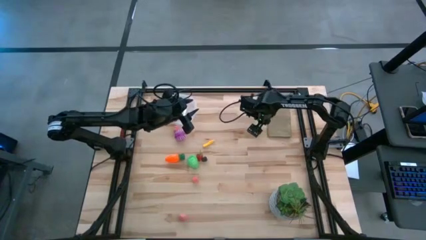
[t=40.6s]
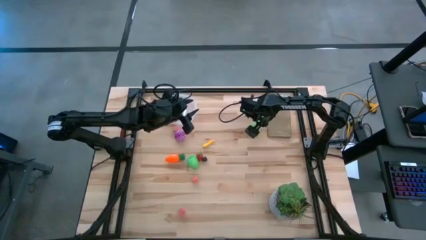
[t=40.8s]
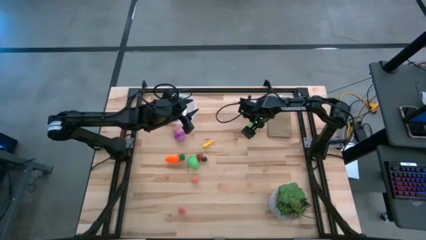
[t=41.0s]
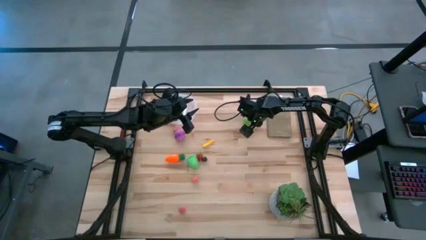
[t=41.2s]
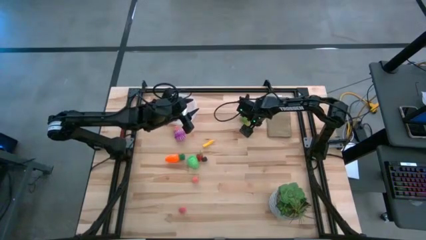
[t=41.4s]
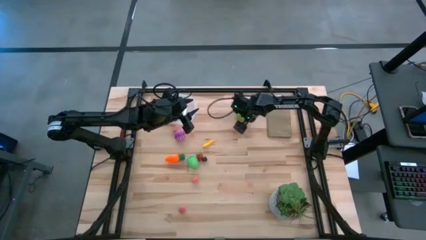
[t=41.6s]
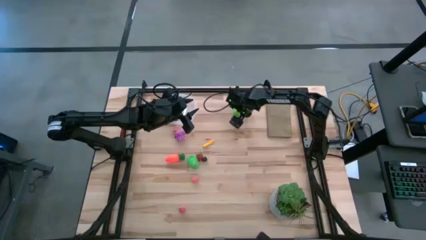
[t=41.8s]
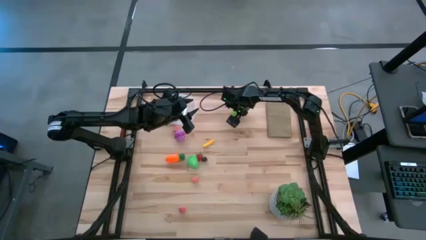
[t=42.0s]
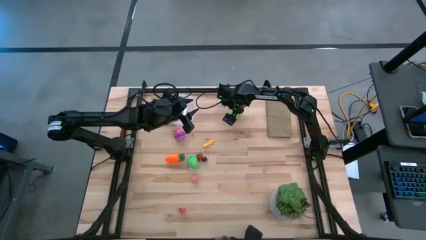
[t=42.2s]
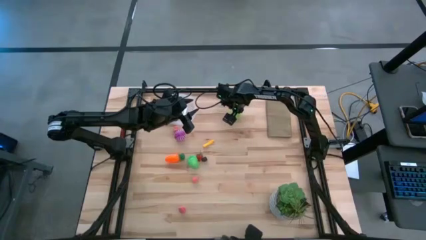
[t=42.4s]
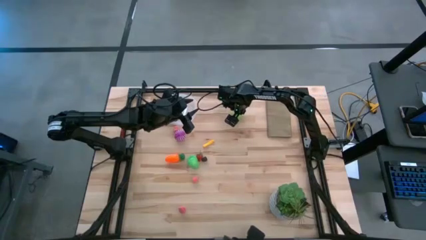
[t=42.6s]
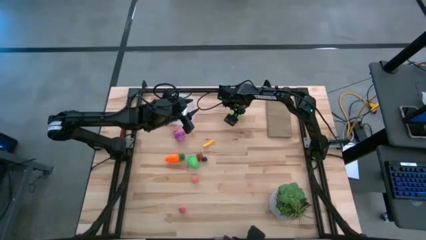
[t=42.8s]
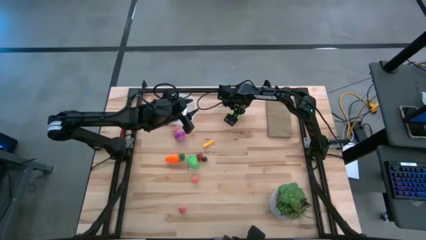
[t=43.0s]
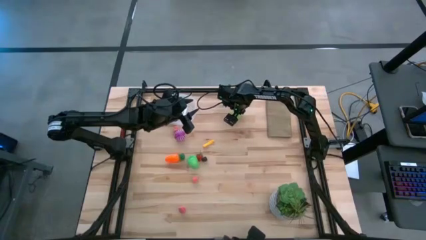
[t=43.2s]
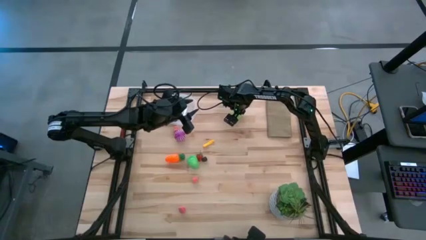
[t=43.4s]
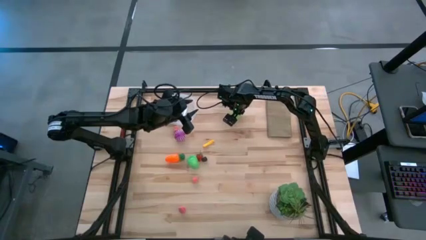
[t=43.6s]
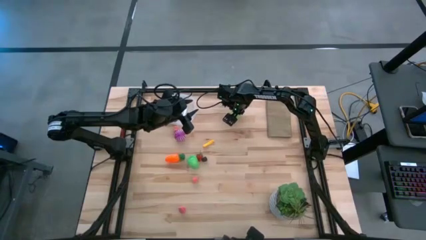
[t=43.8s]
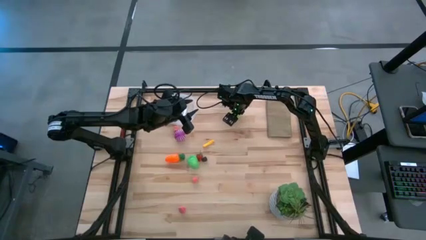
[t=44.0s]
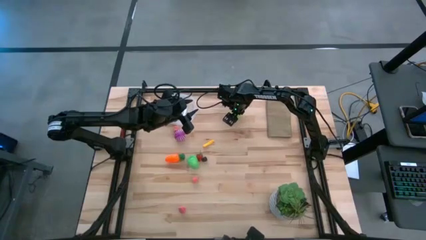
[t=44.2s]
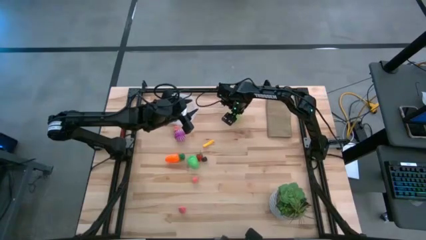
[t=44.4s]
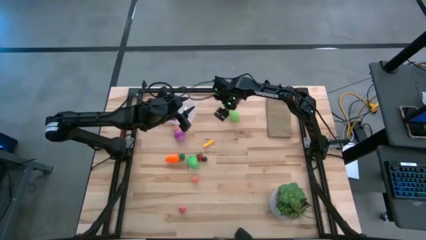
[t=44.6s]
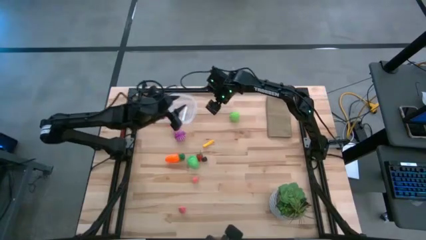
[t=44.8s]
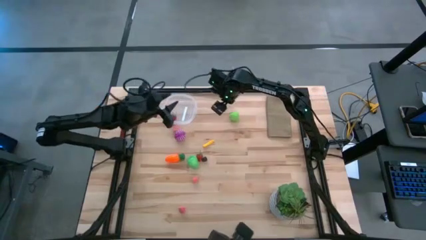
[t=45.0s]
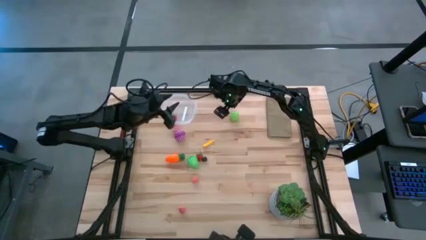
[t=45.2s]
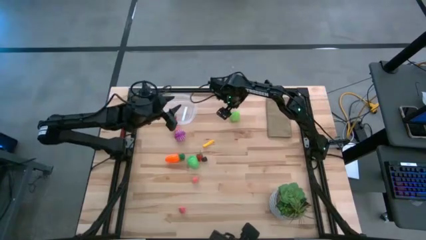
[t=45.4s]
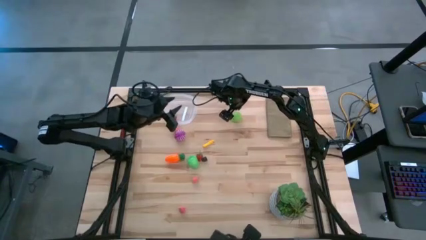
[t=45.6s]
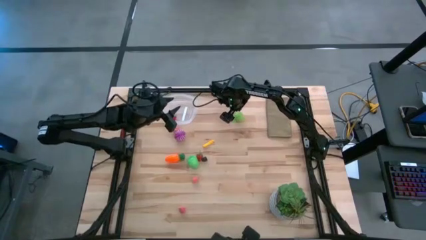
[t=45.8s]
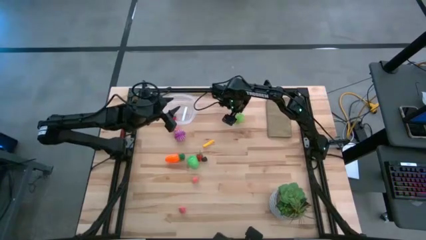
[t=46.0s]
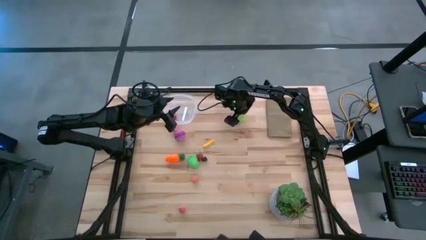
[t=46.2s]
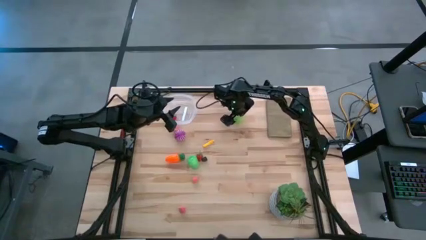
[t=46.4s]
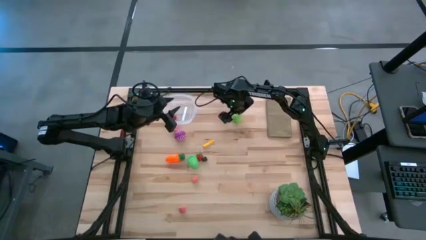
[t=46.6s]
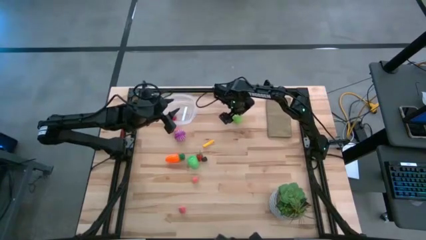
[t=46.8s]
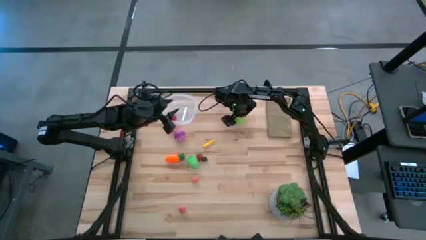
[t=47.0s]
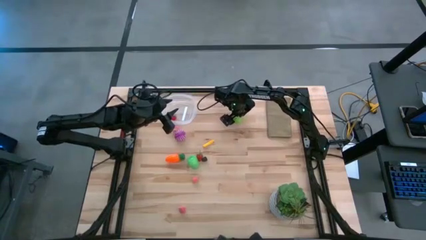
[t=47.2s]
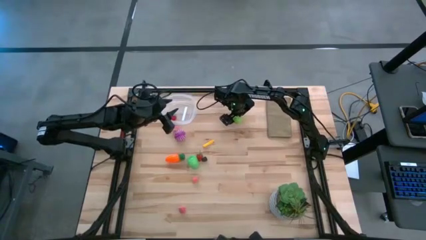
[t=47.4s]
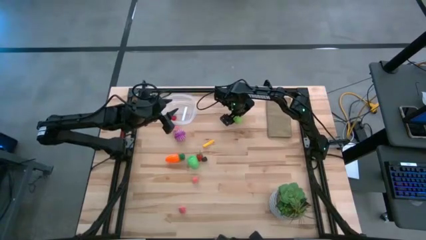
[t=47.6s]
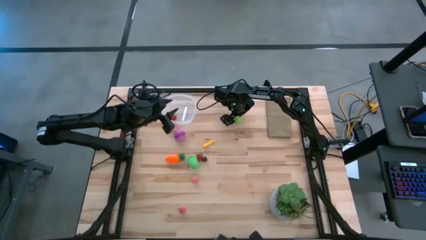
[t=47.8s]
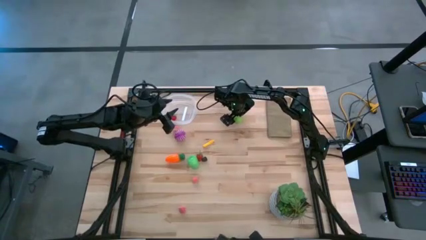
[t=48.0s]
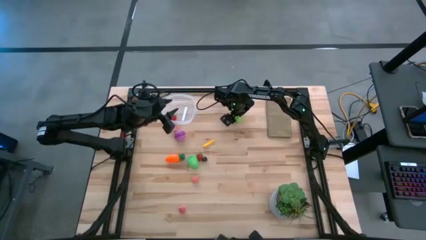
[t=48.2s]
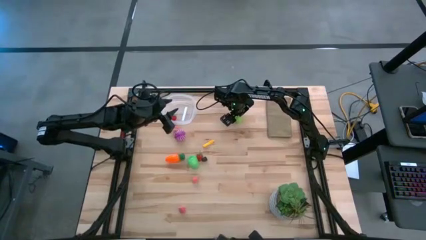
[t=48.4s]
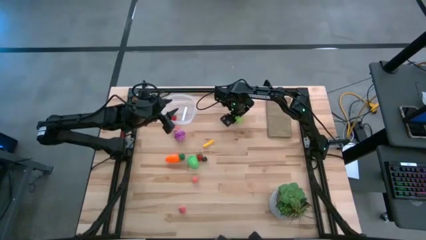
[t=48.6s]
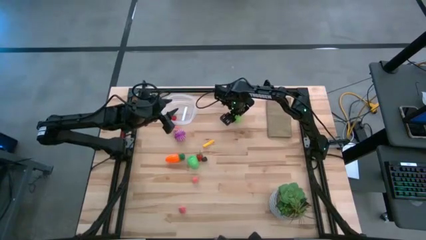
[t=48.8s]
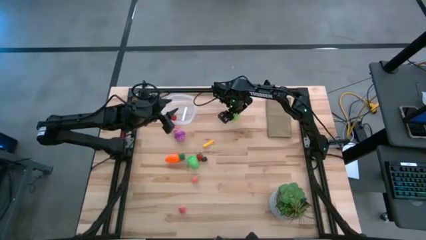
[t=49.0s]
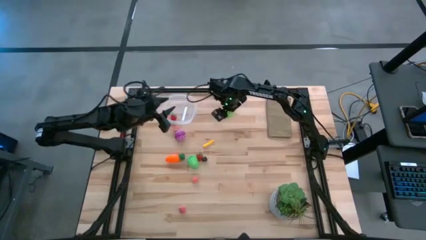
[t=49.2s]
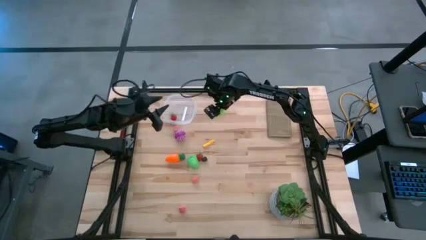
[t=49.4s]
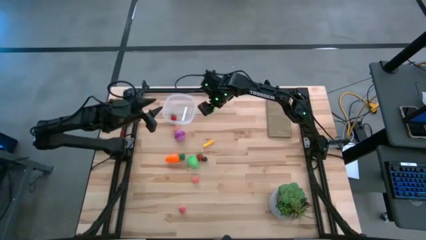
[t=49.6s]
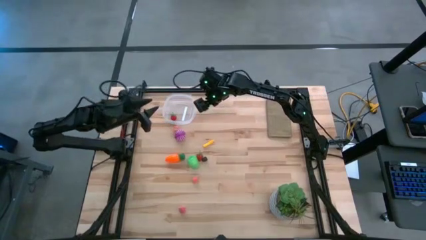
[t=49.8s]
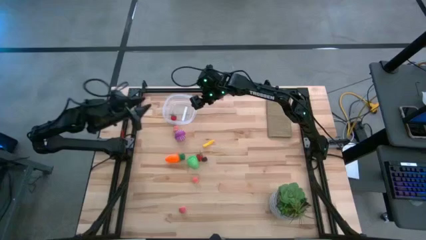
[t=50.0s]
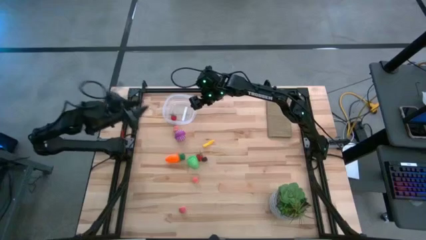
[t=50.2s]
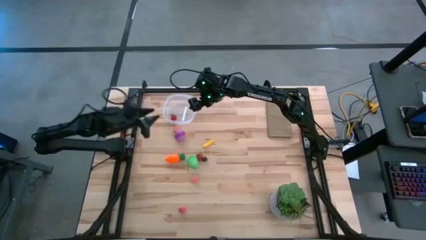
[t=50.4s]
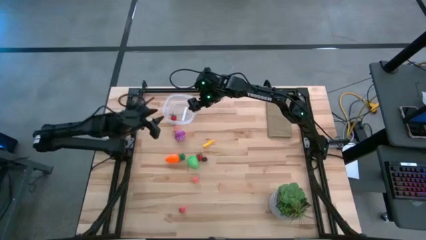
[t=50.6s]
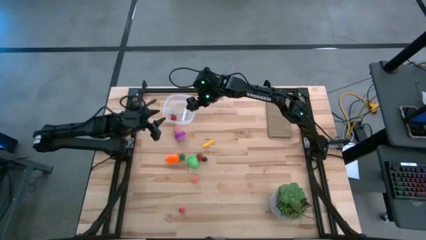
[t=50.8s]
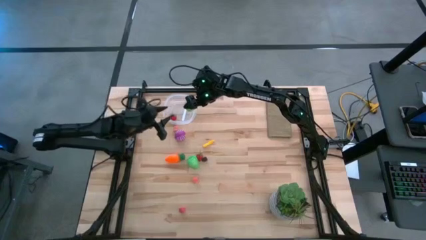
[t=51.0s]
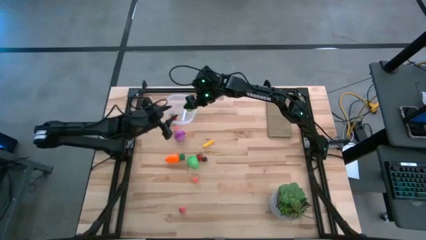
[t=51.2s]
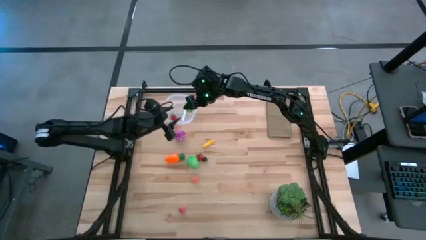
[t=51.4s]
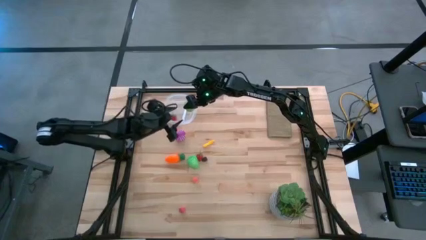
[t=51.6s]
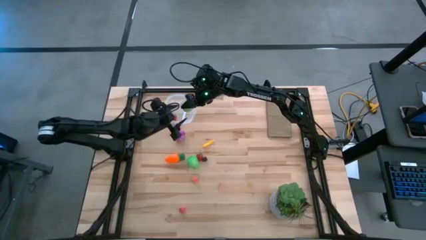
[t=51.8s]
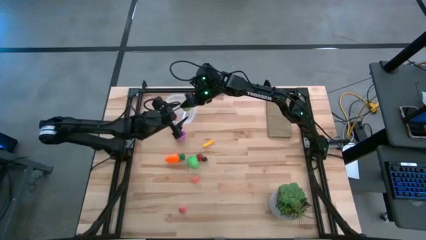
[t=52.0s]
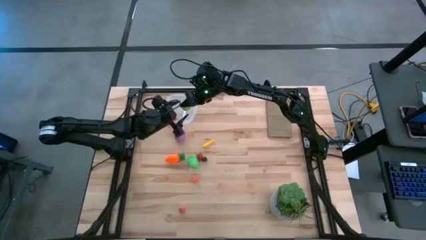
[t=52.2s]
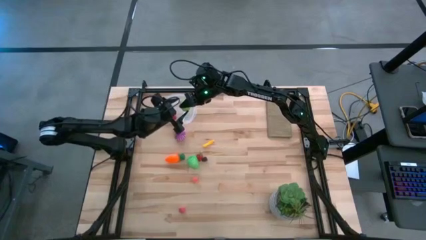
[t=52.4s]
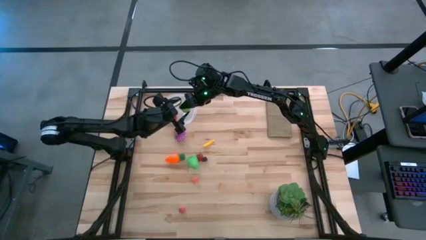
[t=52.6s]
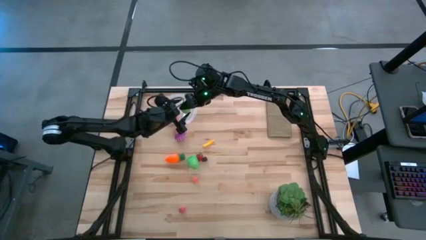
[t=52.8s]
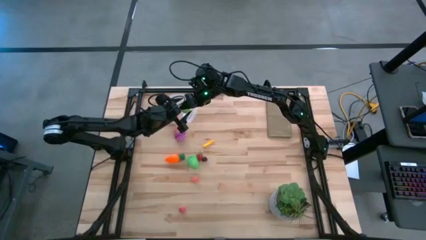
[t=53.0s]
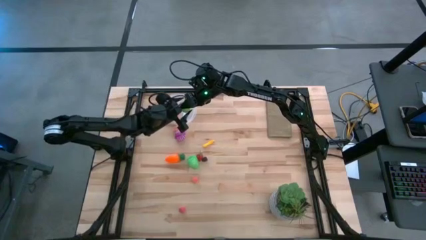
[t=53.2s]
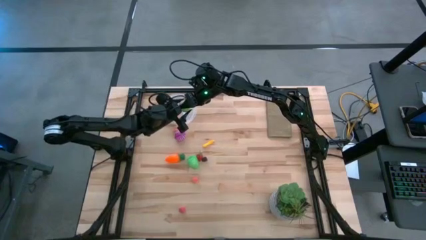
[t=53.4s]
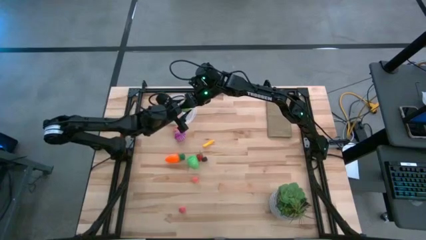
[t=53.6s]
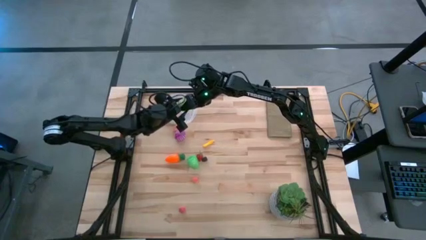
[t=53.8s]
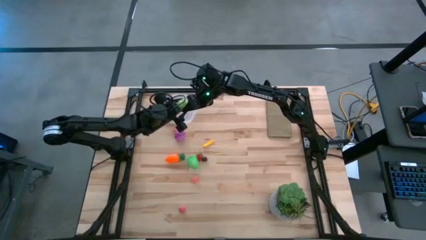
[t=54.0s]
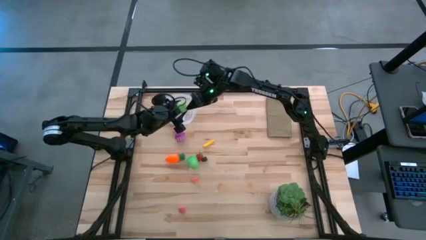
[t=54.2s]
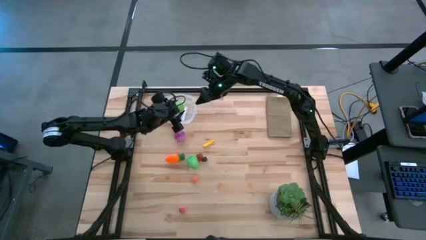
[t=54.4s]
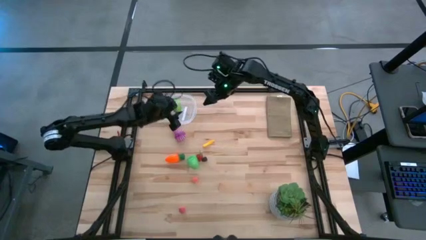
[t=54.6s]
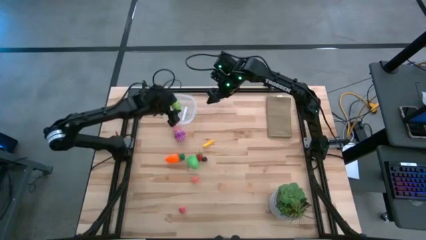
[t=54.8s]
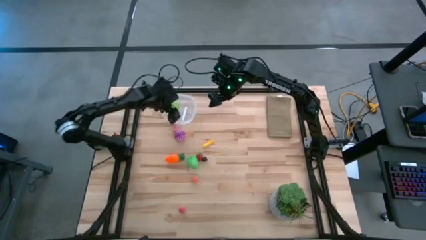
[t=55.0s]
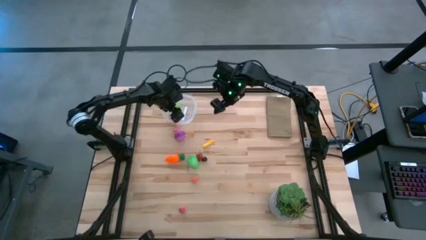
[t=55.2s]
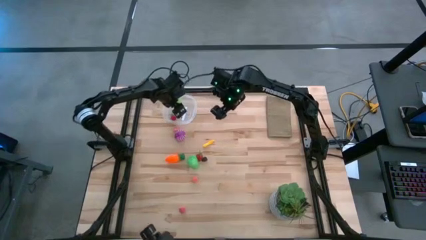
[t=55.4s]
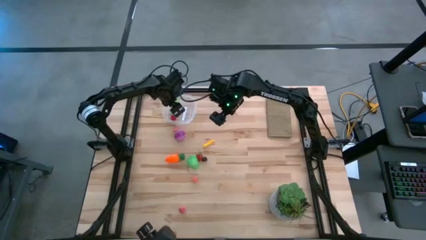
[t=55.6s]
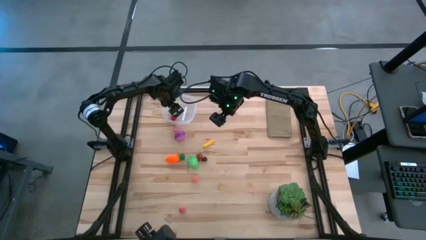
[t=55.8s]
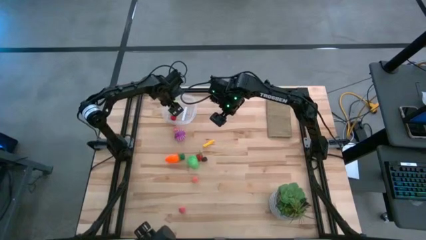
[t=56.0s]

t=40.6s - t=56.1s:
Task: Pick and placing Produce into tupperware
Put the cabbage into the transparent bin
